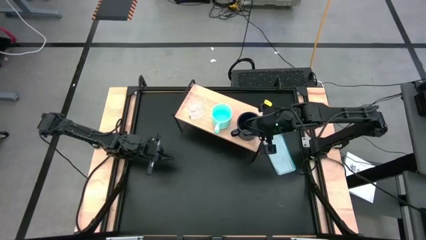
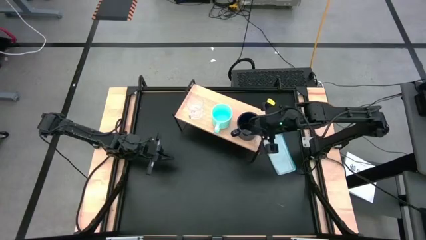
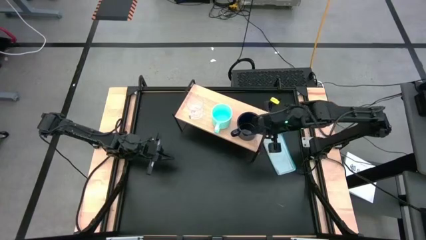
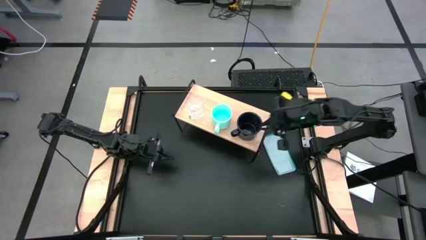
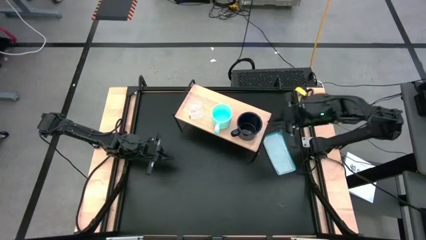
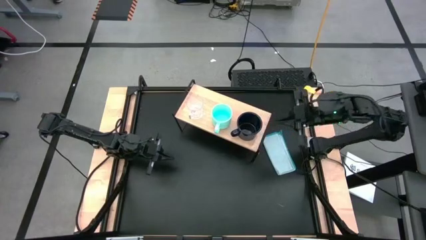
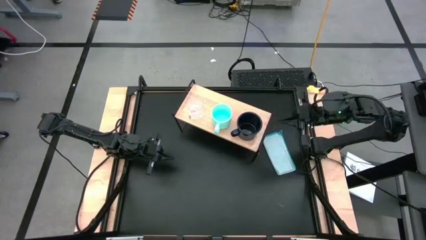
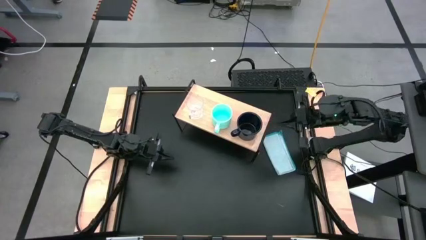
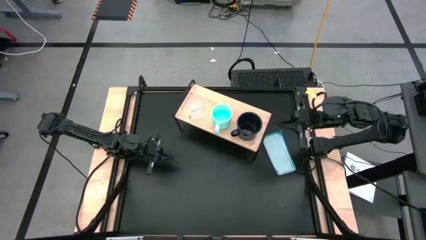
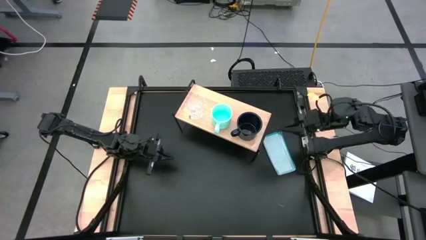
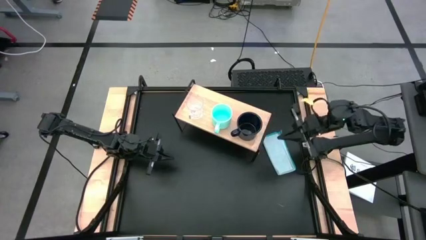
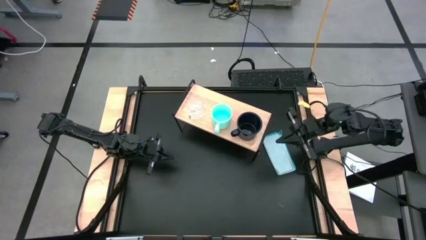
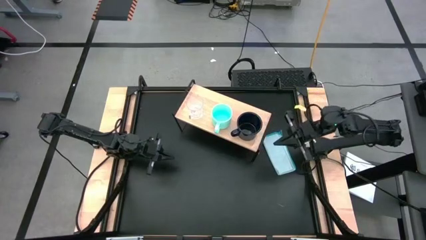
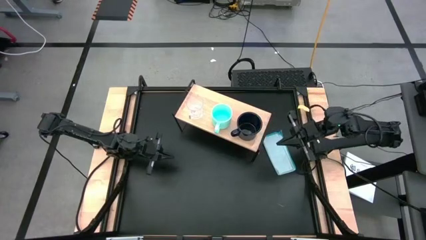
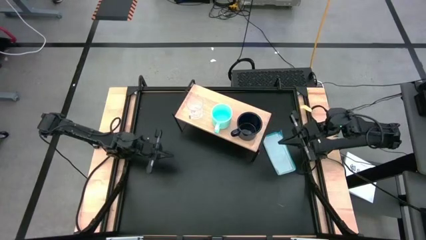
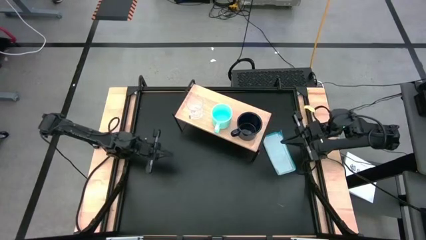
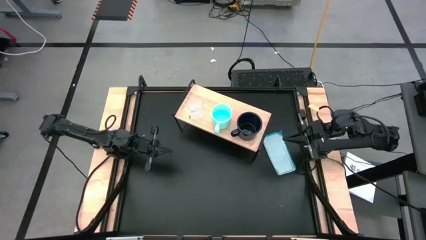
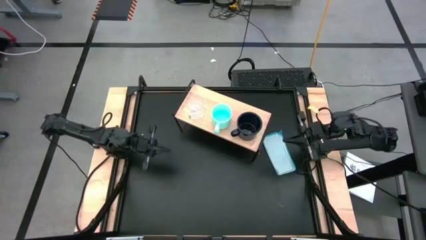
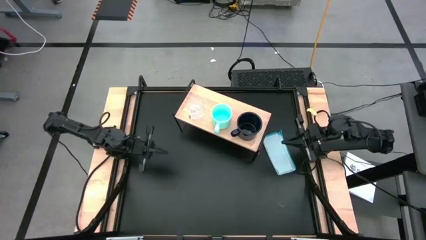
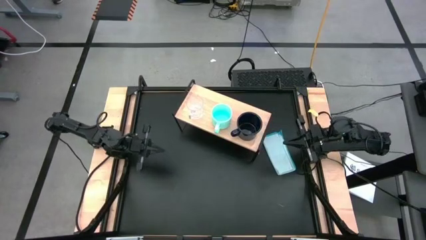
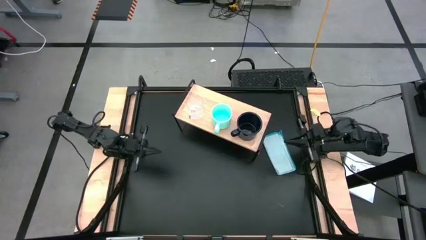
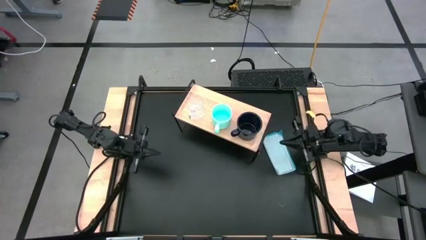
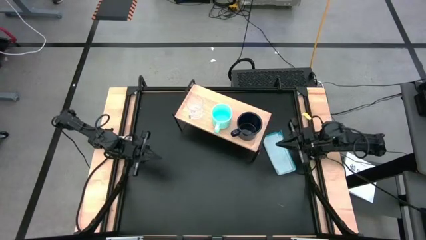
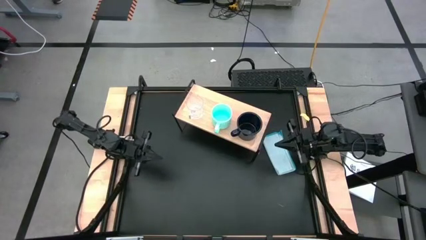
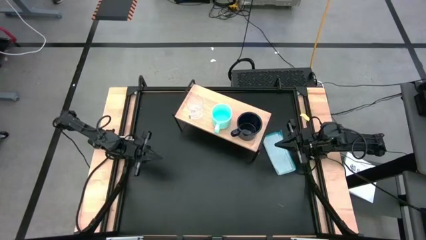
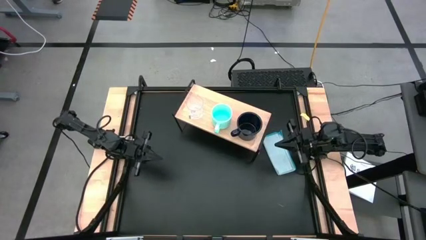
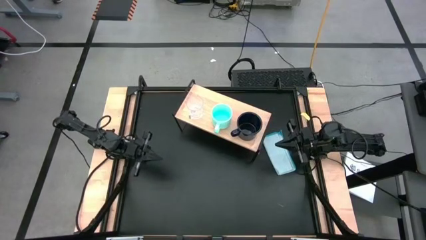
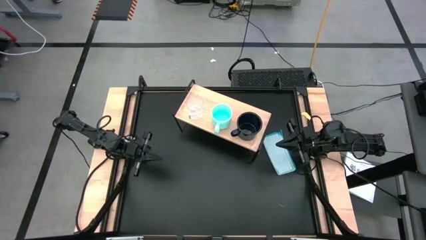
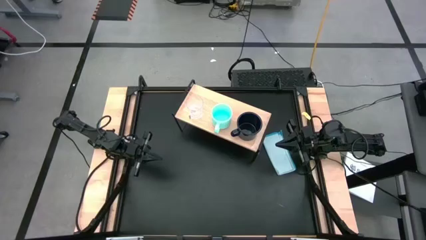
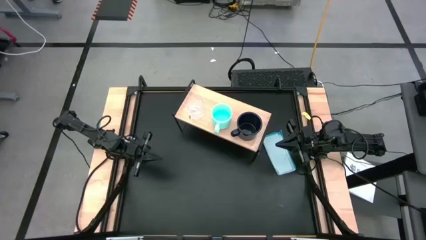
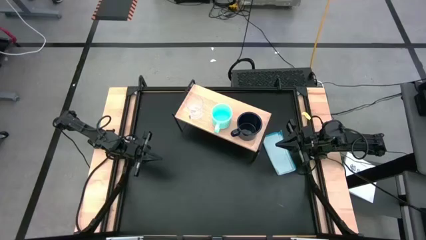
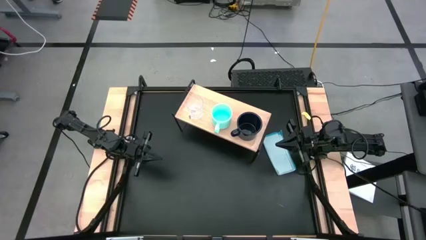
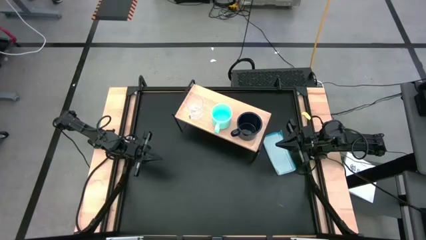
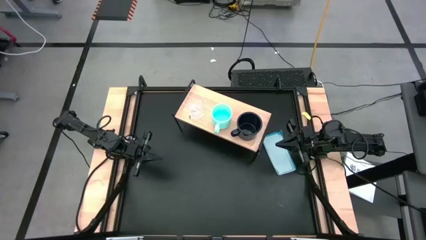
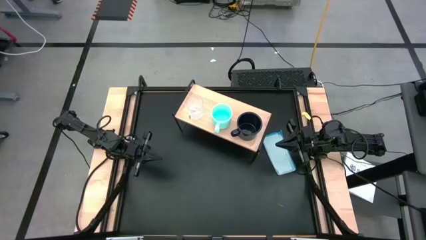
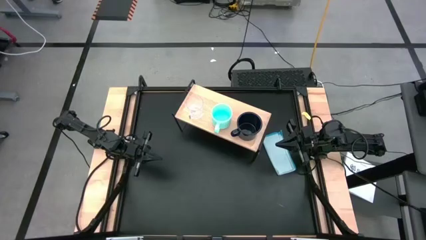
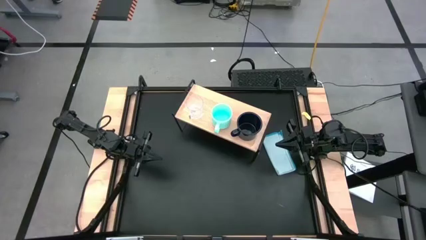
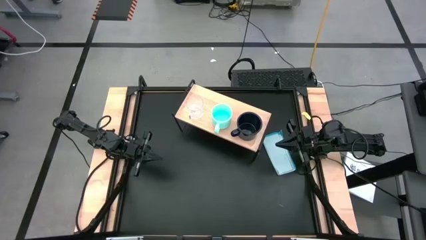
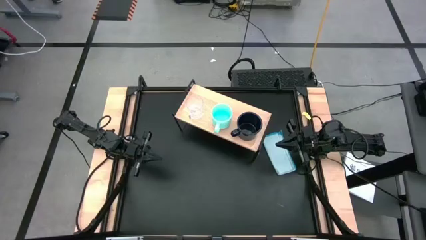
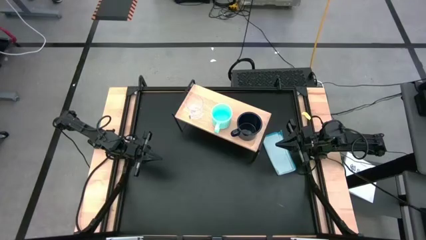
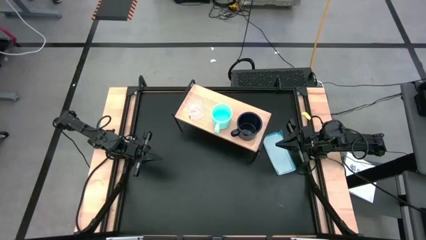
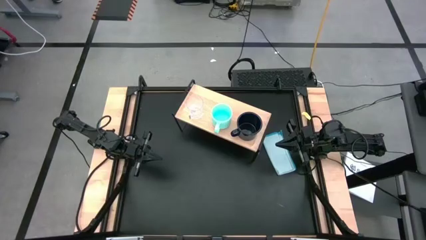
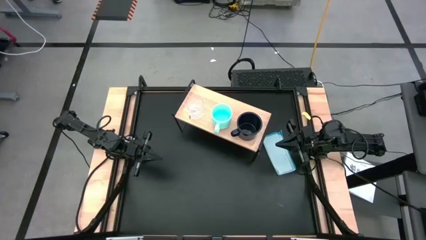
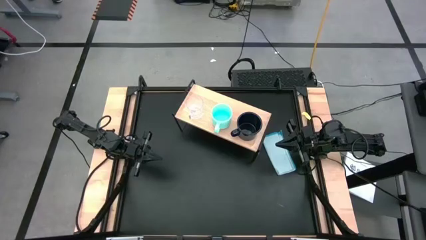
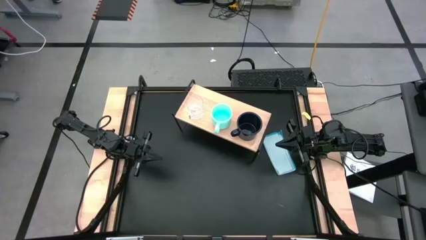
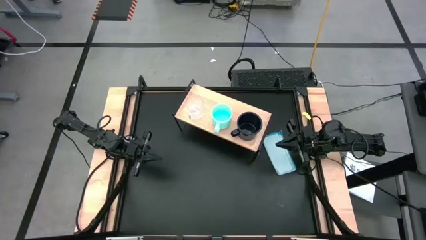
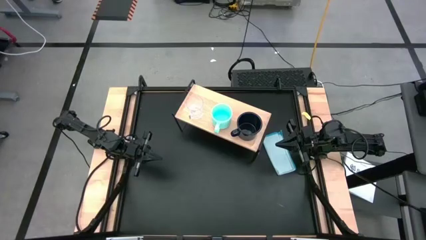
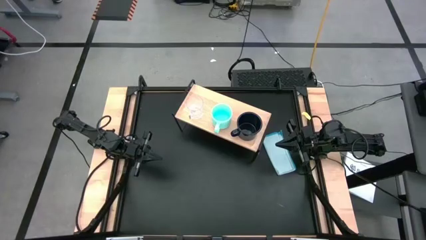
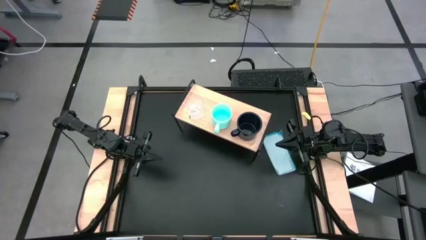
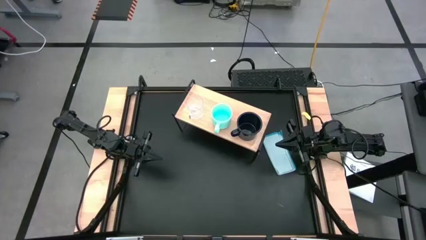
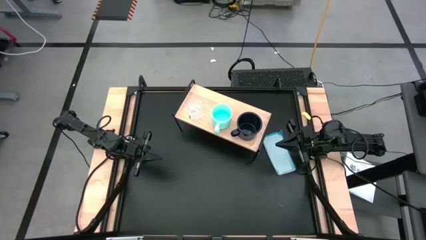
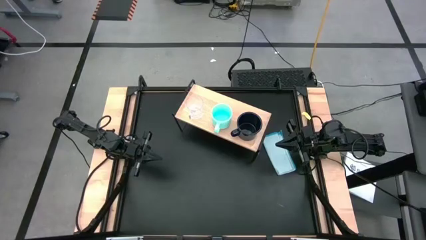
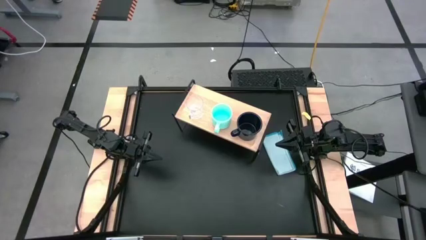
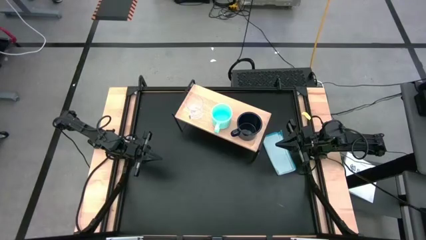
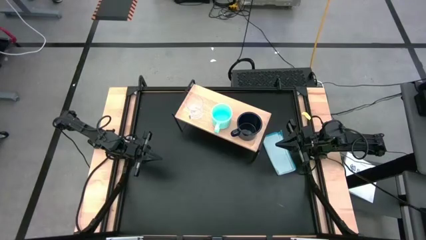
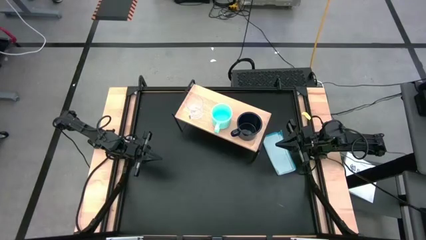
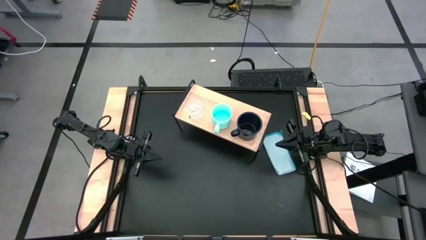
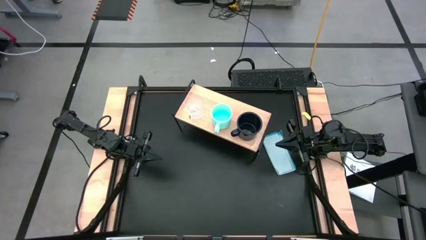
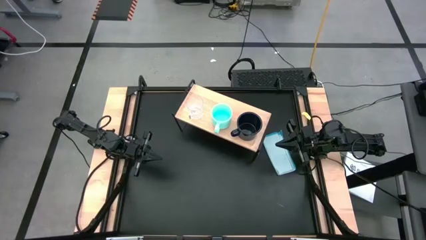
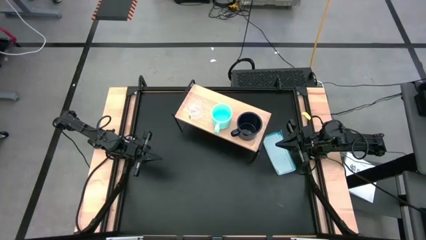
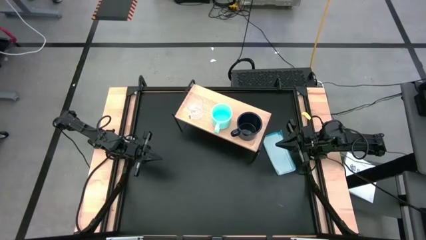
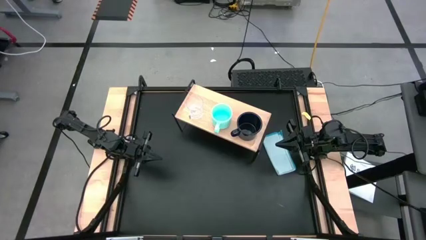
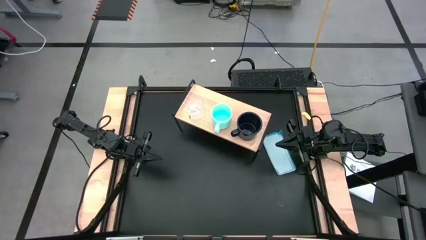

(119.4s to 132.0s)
Task: Stack small to large cups/mugs on shelf
Return to Home Position
